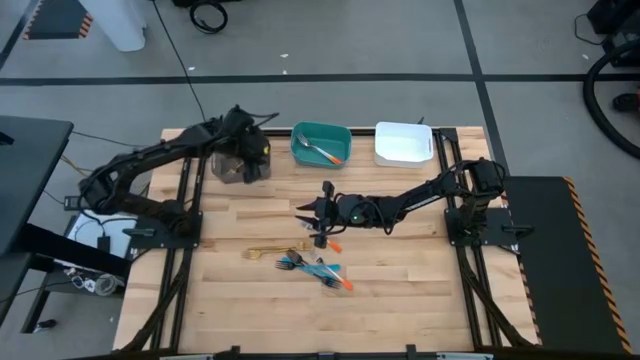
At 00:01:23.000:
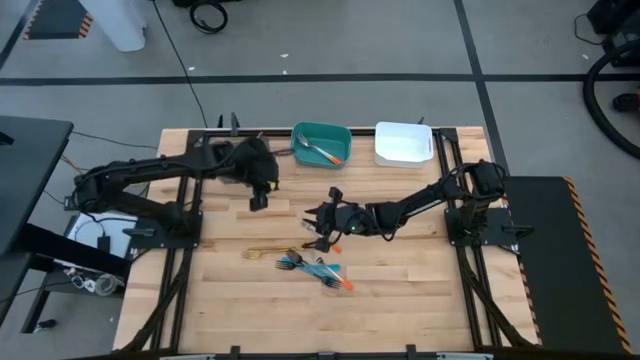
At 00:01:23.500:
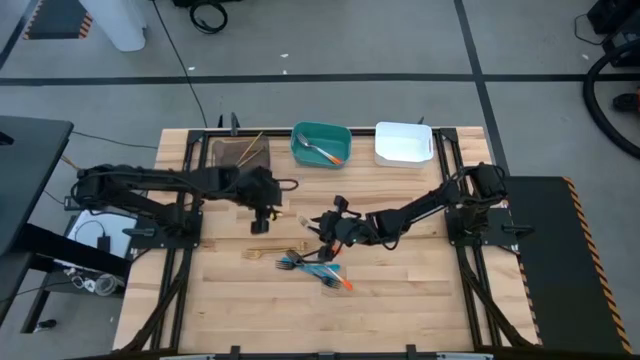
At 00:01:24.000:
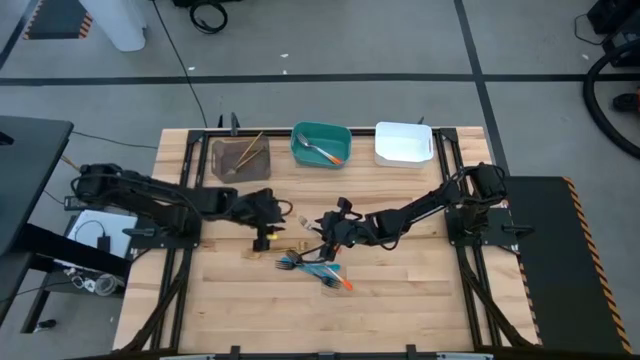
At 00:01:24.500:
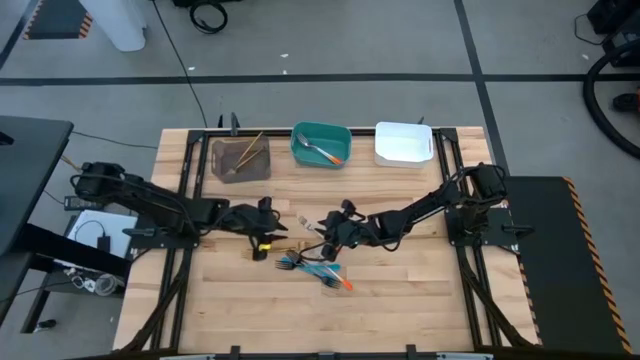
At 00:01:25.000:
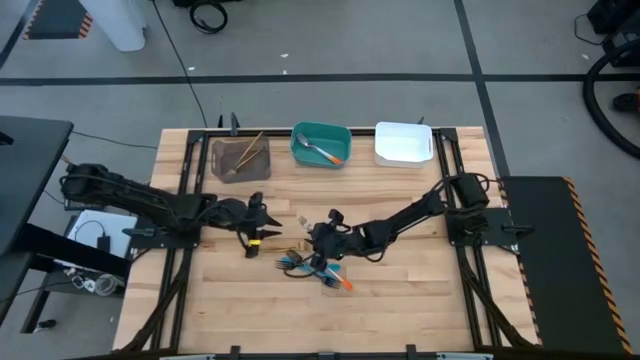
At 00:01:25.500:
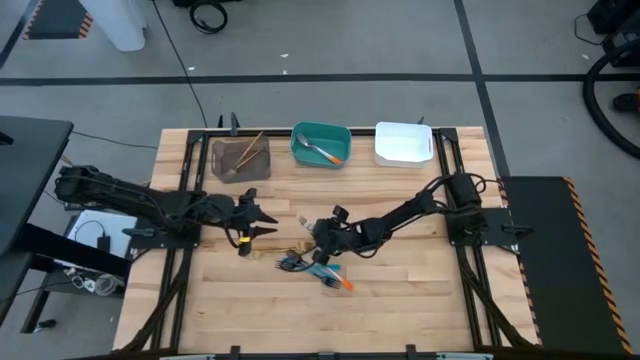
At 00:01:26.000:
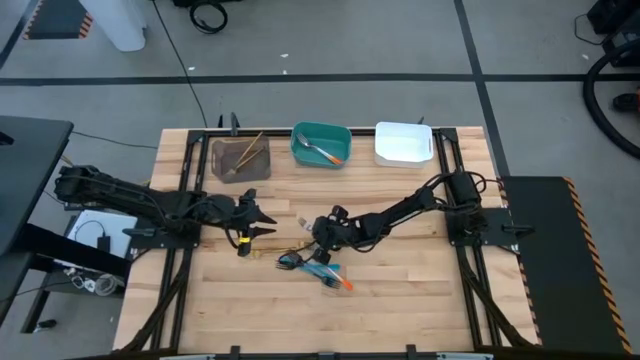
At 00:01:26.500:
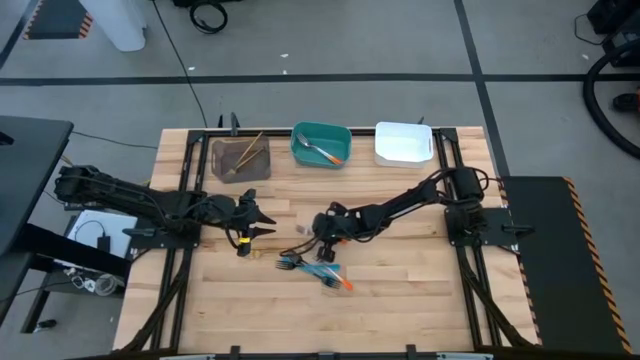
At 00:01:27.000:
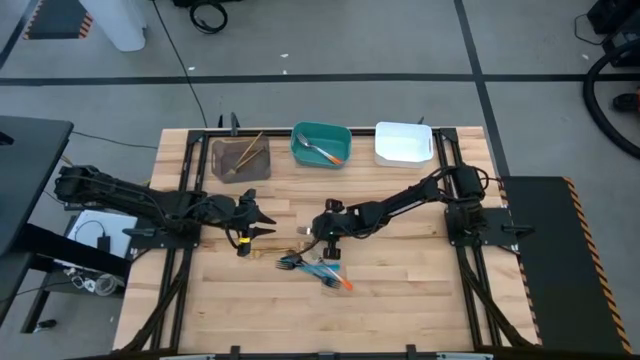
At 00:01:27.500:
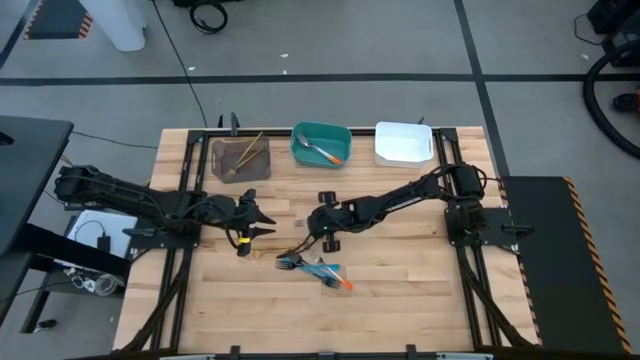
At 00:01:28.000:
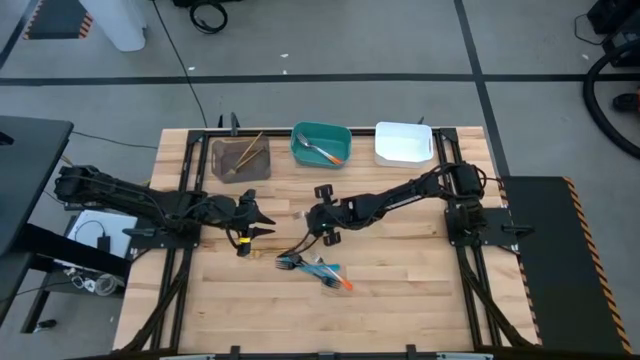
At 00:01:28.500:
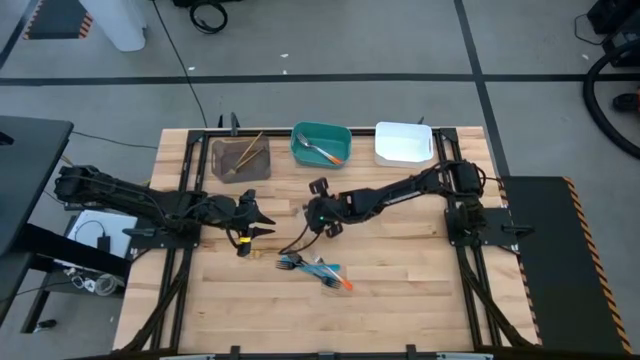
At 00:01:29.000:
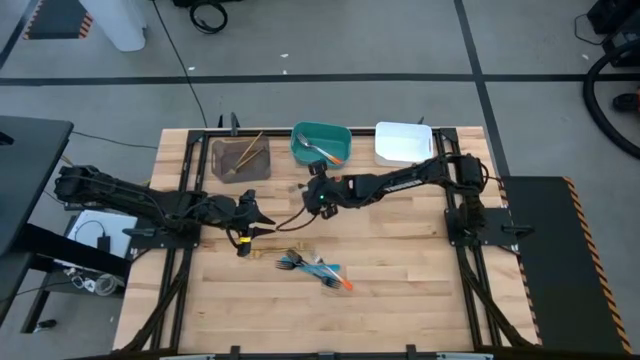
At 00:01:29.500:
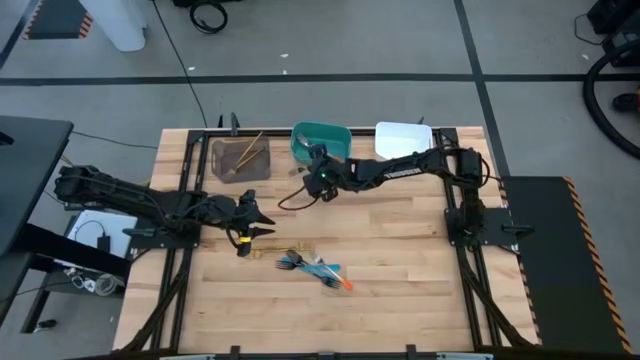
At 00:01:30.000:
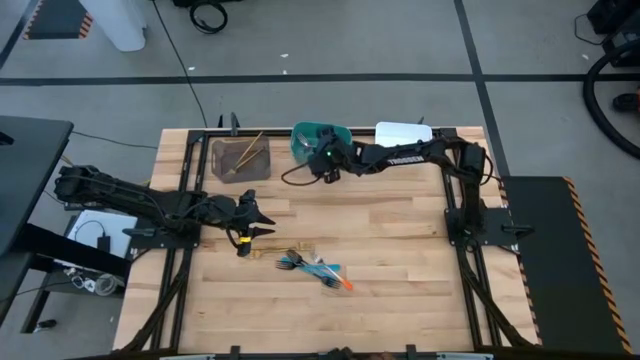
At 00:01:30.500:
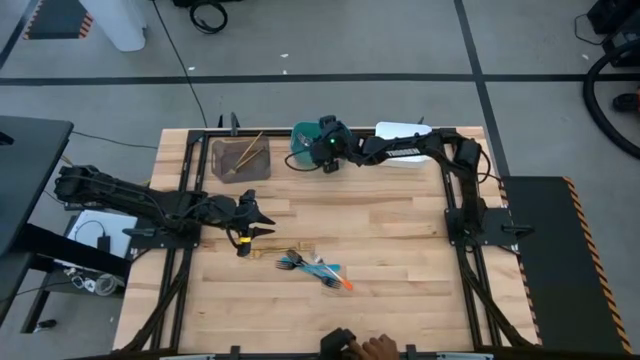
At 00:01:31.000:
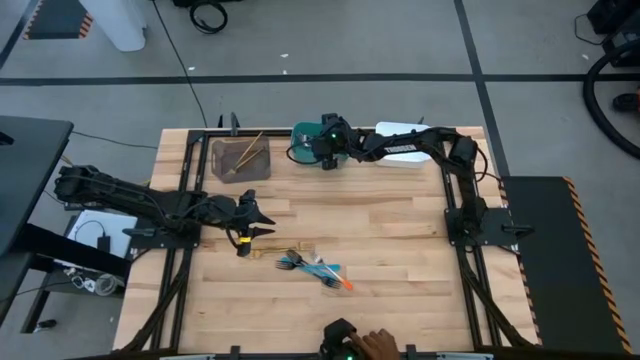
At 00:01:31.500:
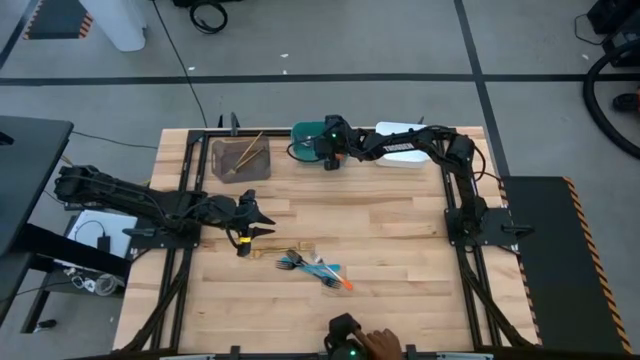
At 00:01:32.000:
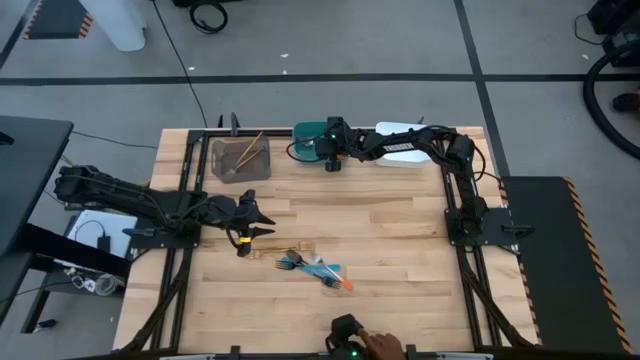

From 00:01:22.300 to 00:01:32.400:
Task: Sort silverware by color (type)
Put the orange fork into the blue bin

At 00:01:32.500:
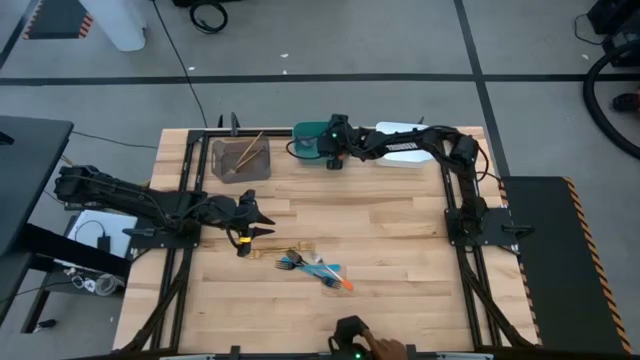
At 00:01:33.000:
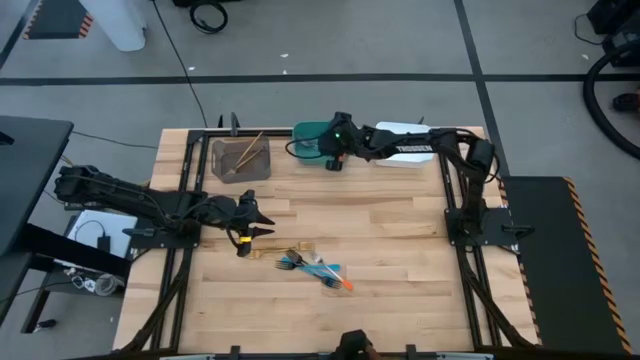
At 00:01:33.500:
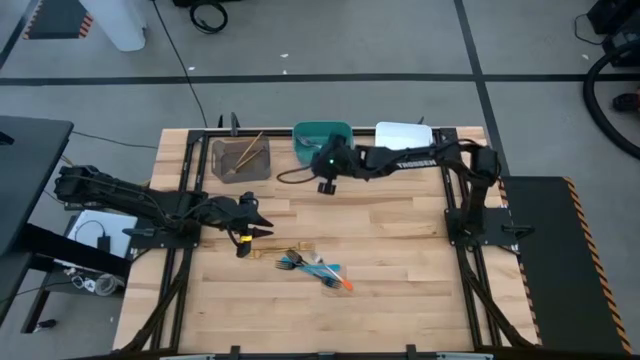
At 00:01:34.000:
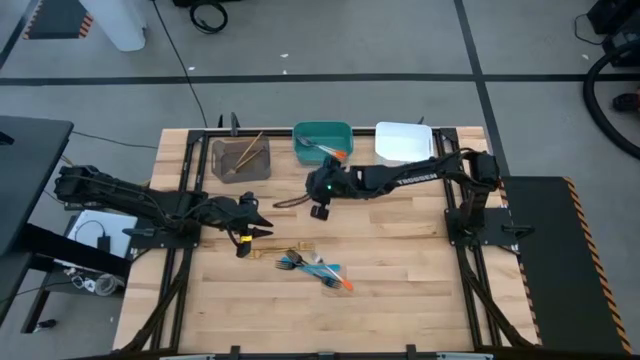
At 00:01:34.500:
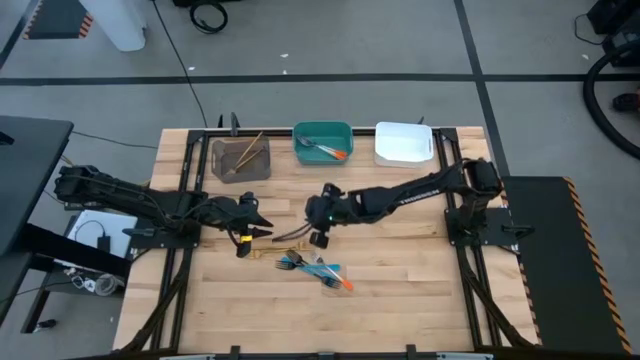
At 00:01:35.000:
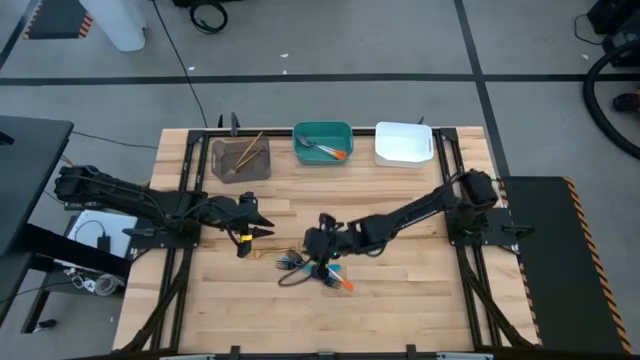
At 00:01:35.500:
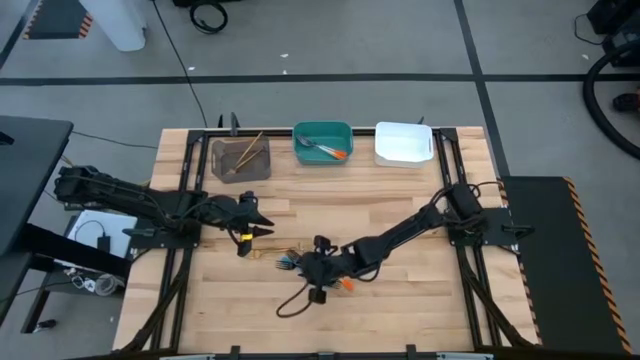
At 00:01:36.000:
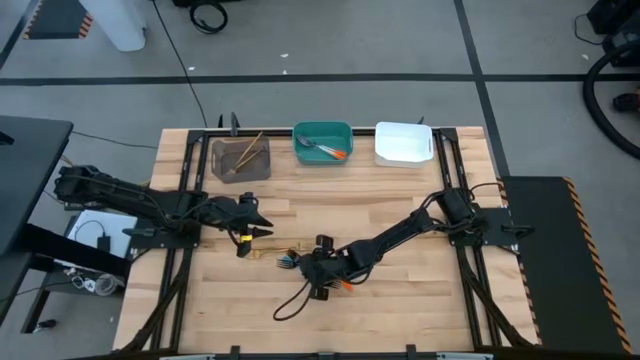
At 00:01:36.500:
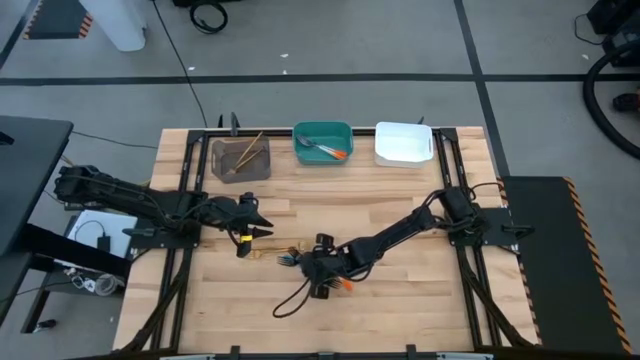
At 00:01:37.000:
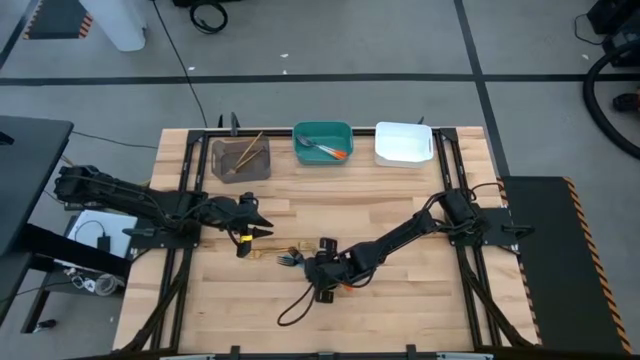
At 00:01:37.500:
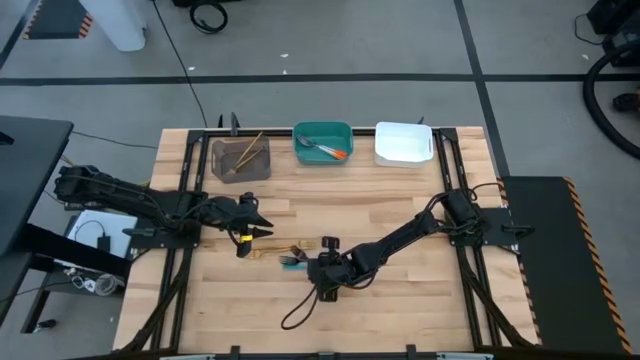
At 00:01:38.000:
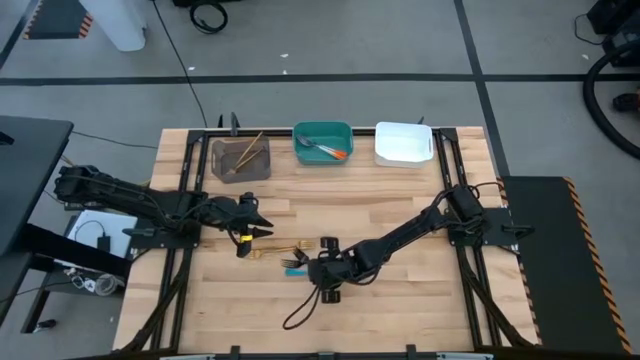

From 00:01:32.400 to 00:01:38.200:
Put the blue fork into the white bin
